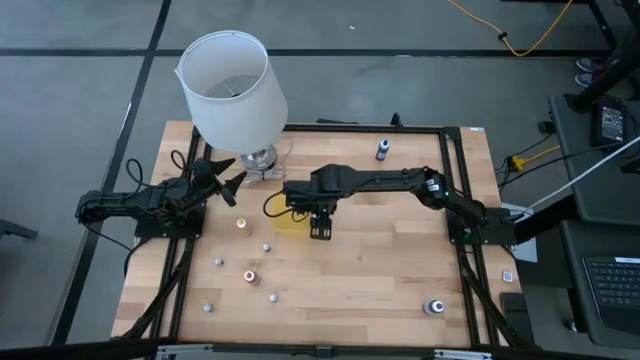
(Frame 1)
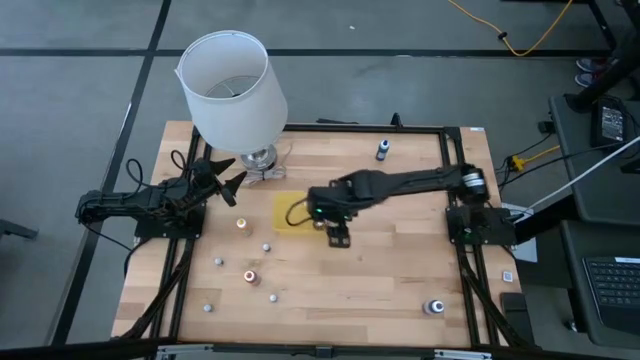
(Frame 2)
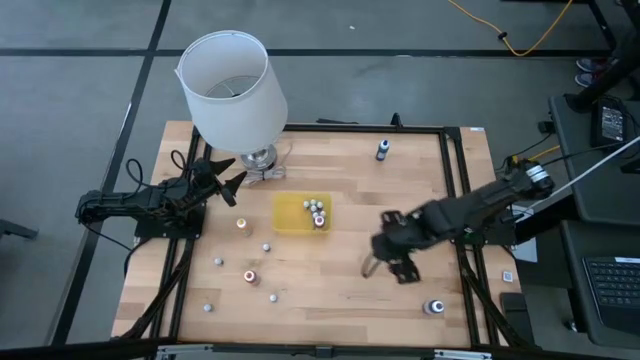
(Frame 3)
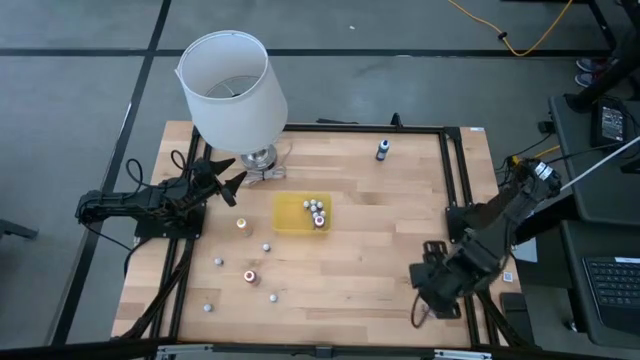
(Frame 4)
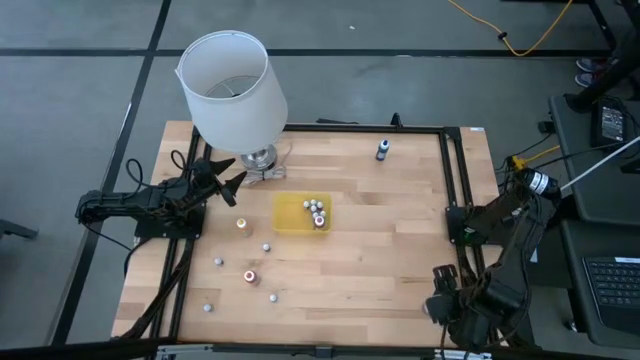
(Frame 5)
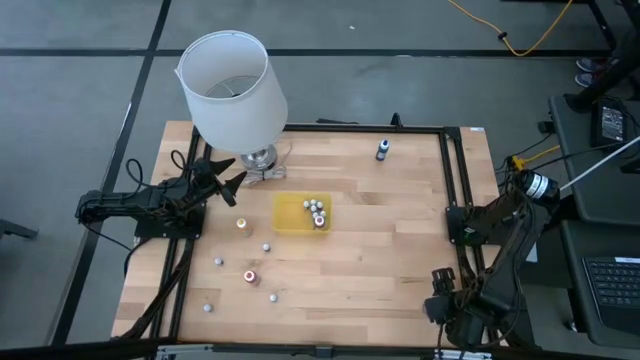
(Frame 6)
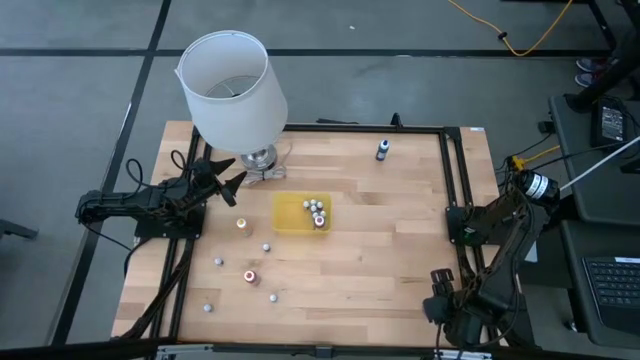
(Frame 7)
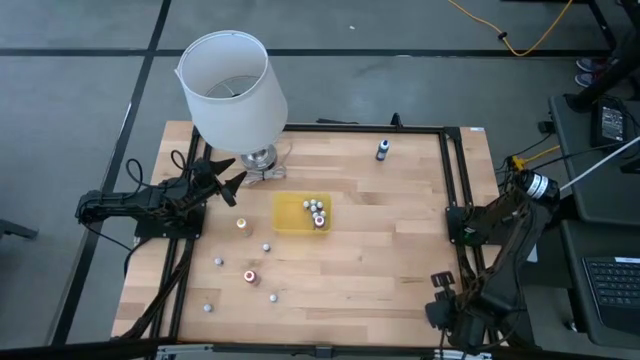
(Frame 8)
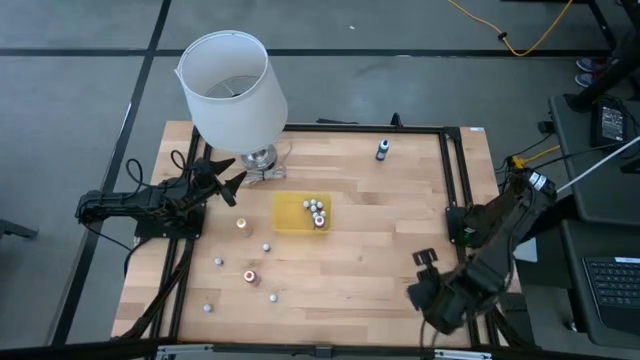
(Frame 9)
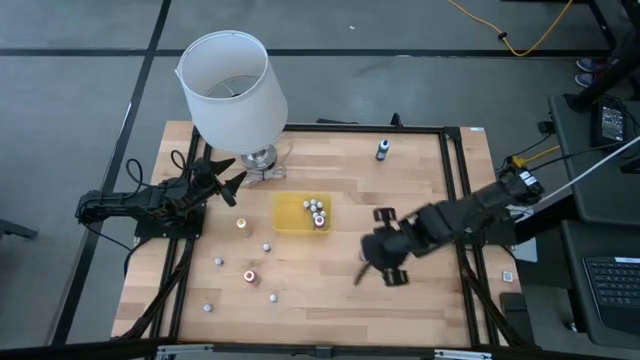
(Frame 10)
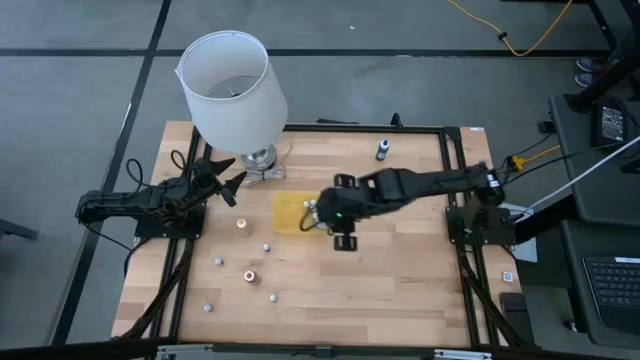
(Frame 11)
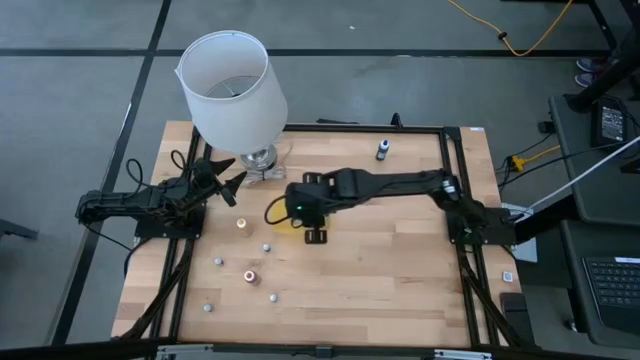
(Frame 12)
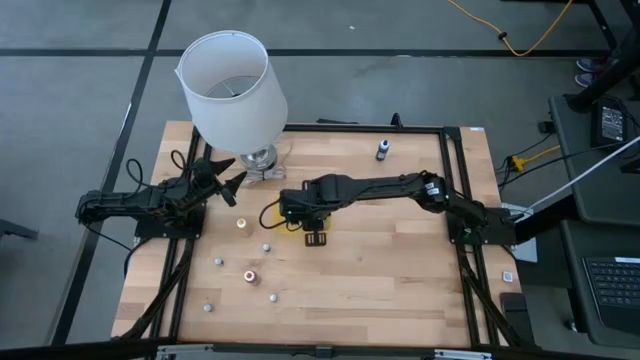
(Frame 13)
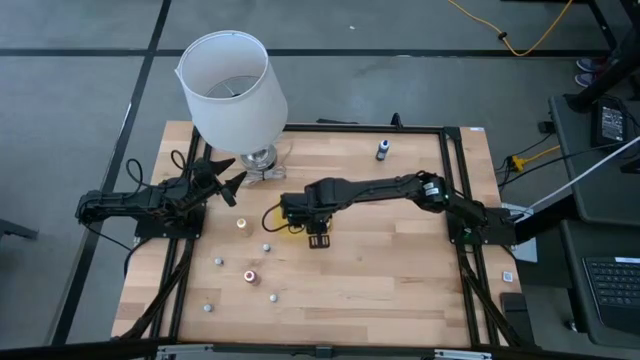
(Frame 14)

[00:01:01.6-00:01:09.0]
Task: Pick & Place food coloring
Put the purple ink bottle into the yellow bin

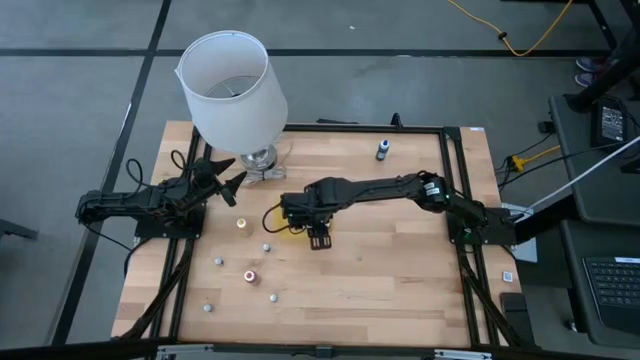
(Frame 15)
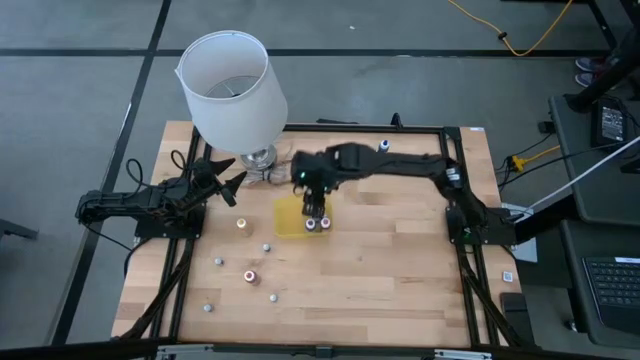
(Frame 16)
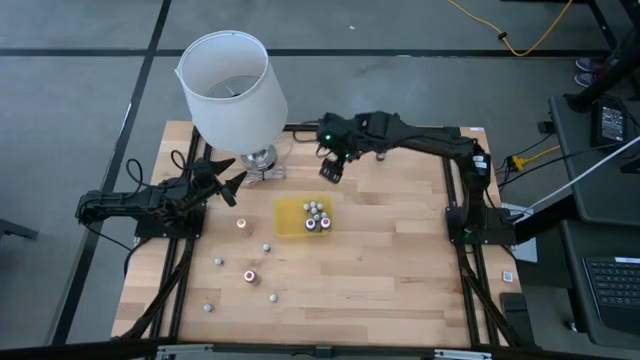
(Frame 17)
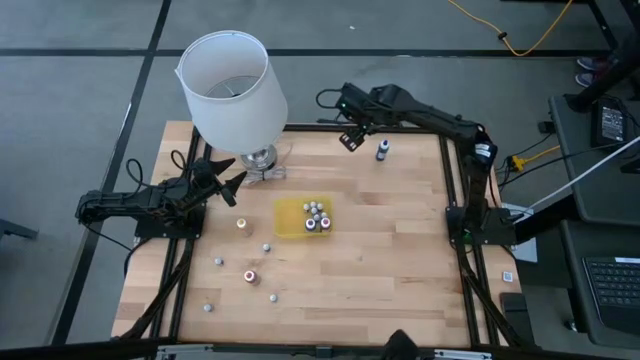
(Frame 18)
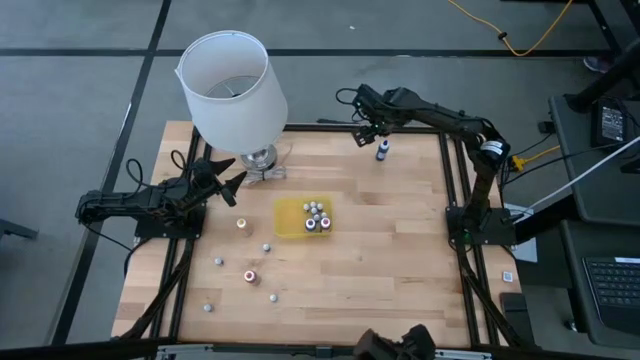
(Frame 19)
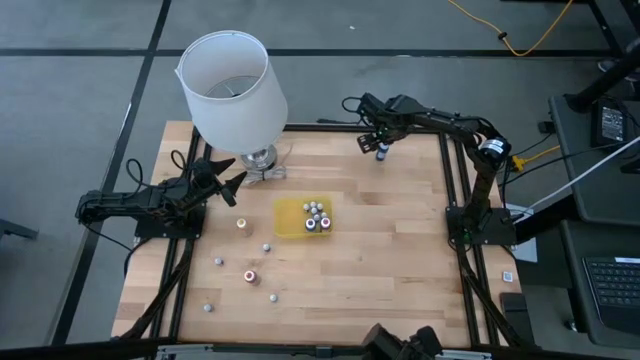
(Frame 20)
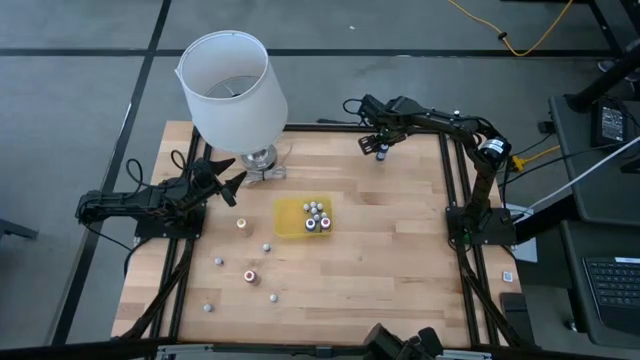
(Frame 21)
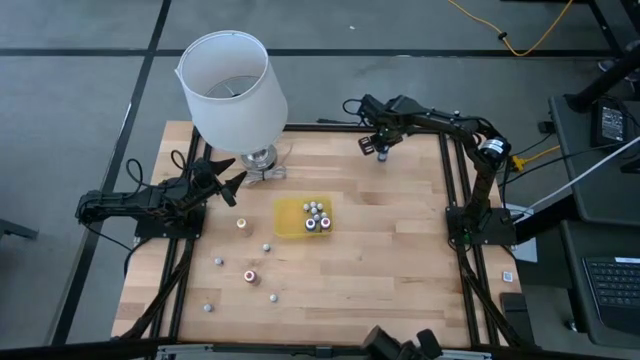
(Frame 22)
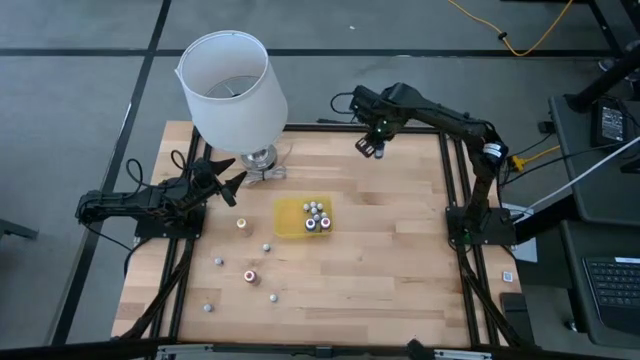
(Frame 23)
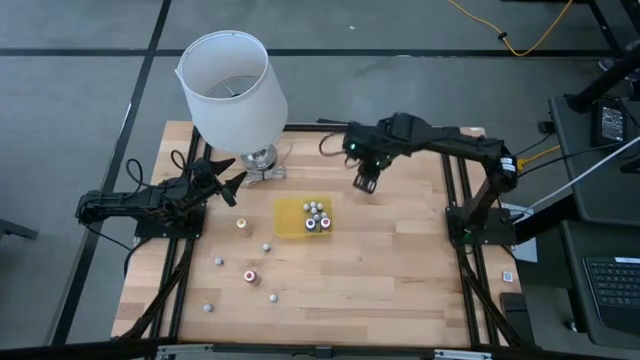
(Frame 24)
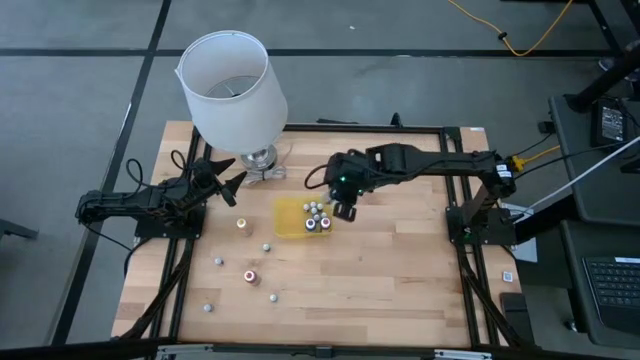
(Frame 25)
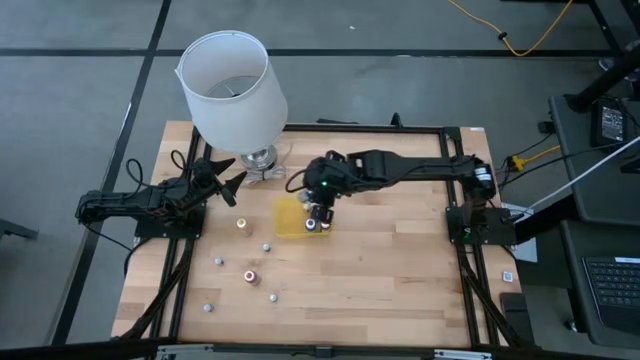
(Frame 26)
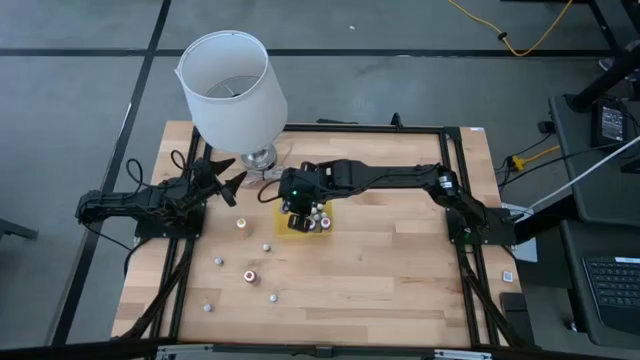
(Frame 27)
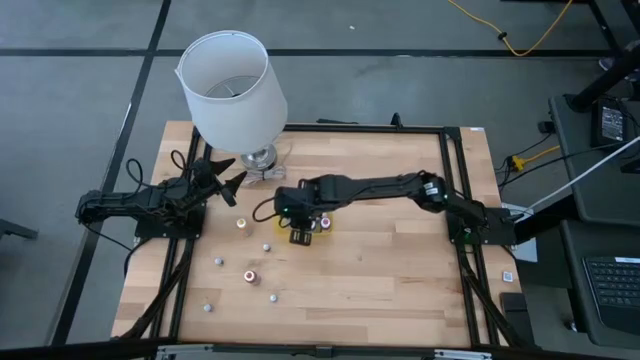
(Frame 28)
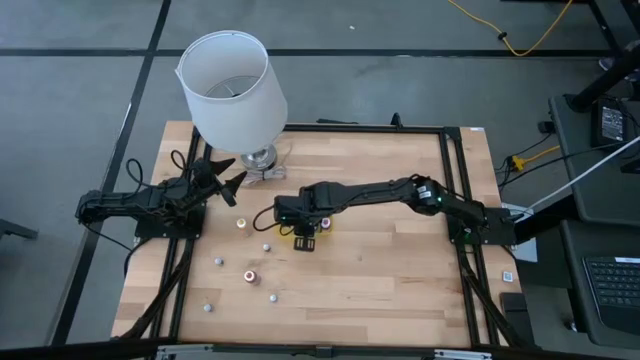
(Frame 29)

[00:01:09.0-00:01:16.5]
Put the blue food coloring bottle into the yellow bin

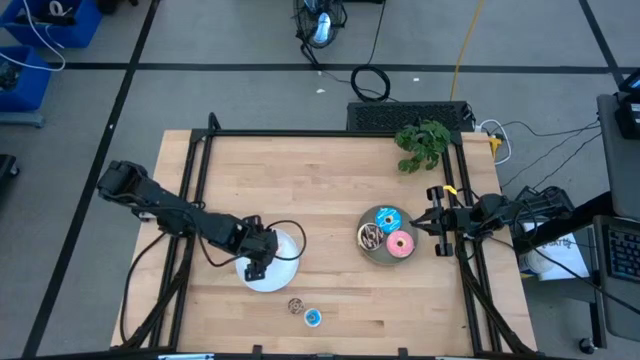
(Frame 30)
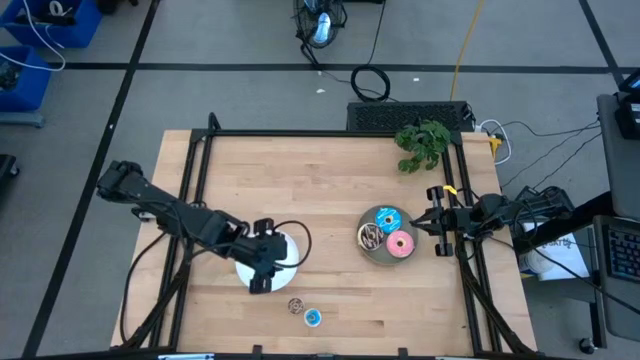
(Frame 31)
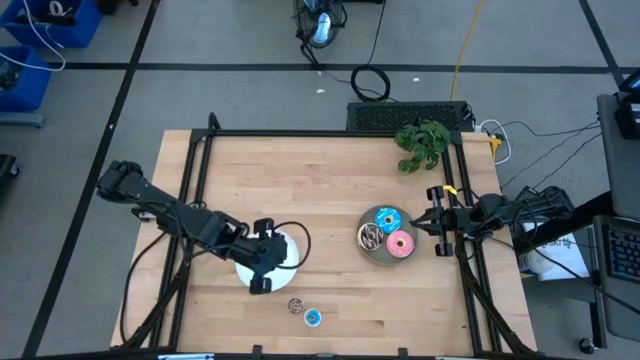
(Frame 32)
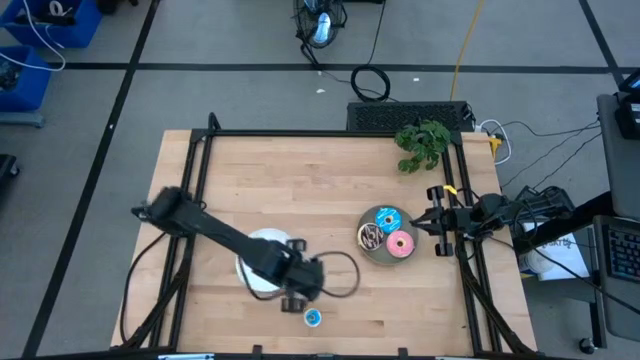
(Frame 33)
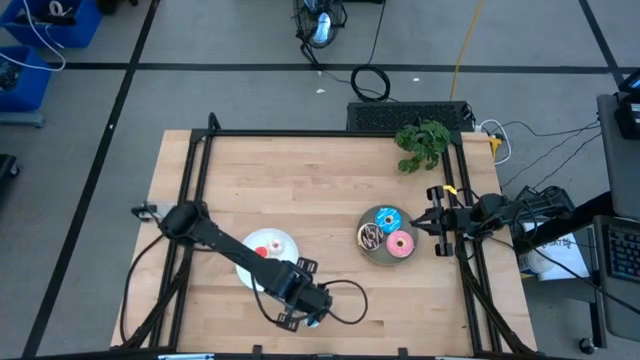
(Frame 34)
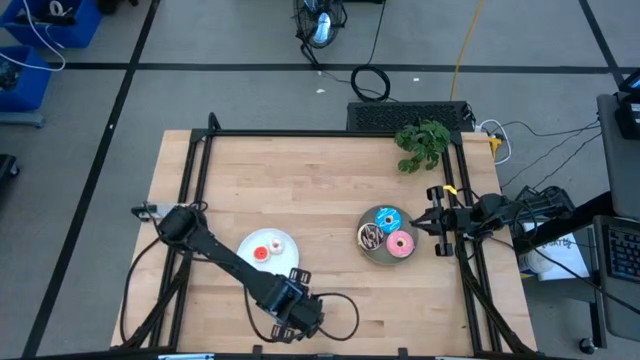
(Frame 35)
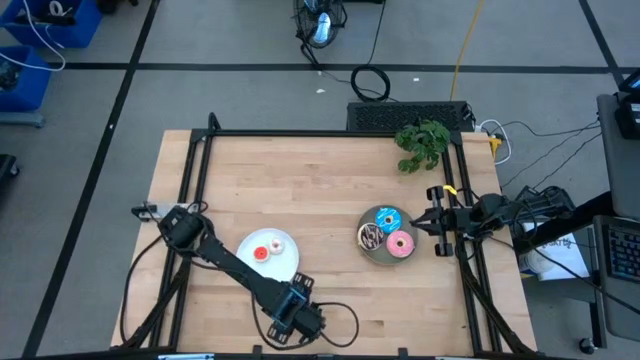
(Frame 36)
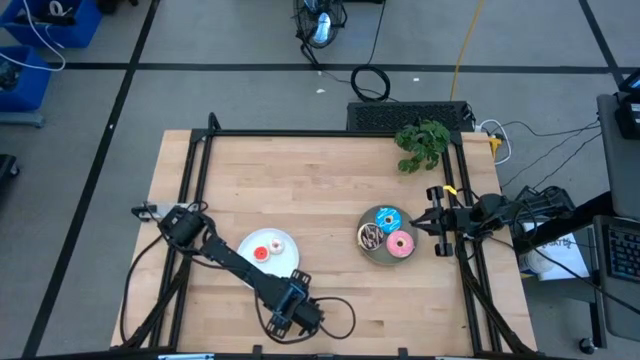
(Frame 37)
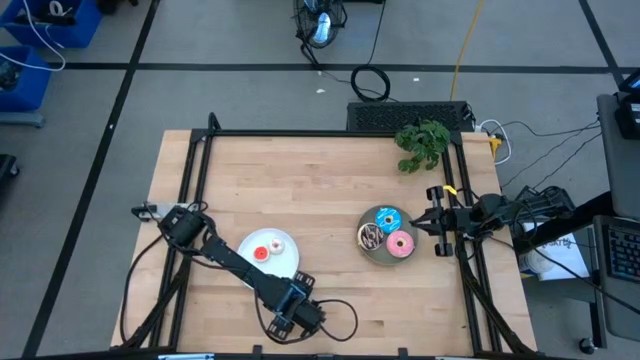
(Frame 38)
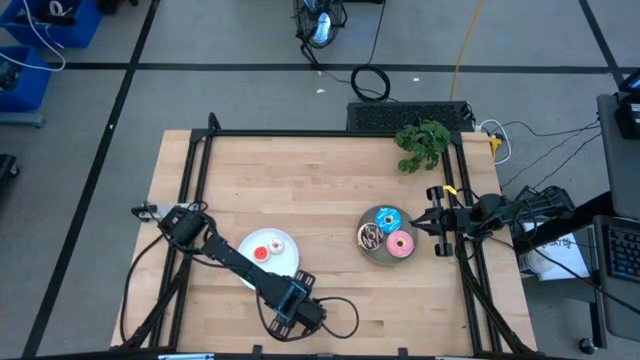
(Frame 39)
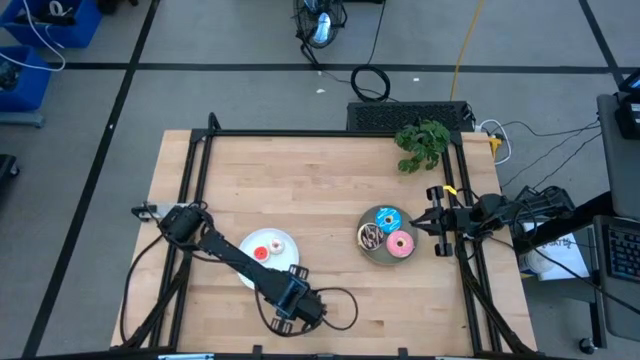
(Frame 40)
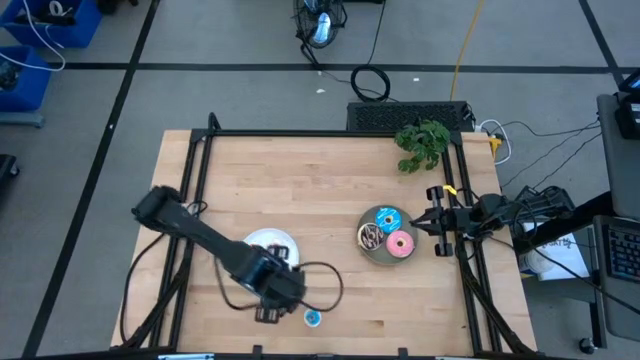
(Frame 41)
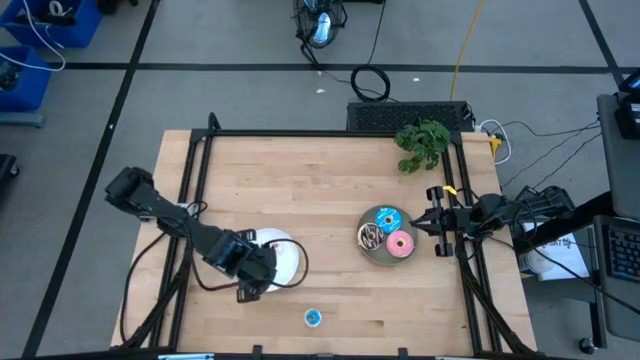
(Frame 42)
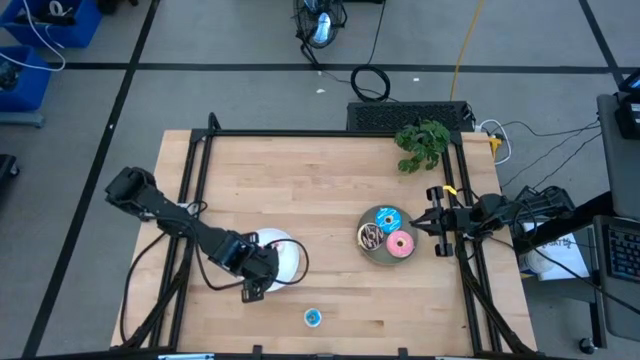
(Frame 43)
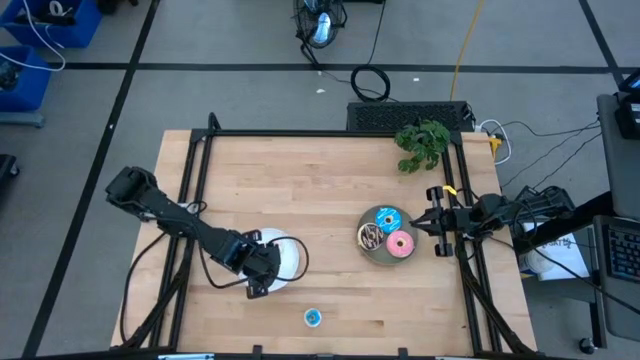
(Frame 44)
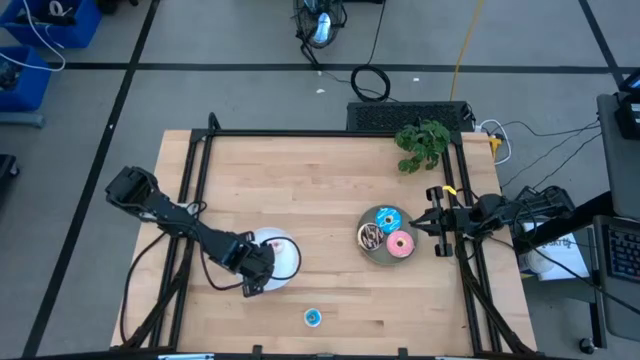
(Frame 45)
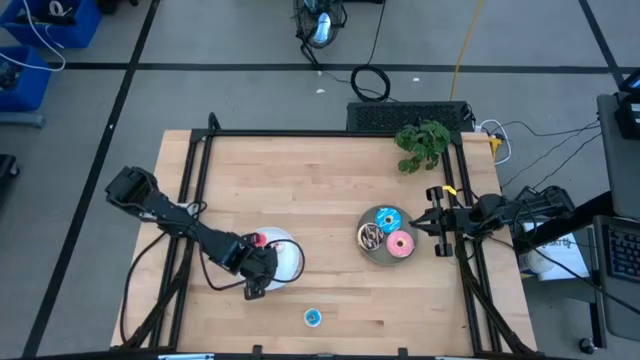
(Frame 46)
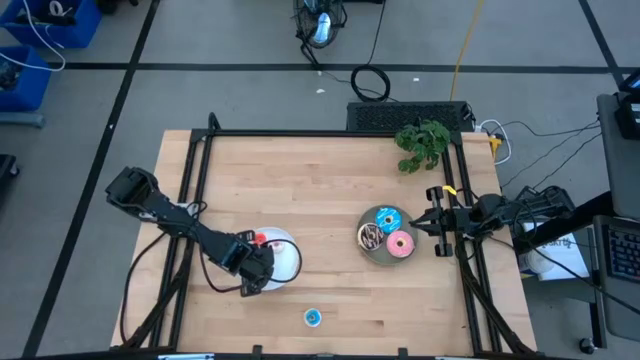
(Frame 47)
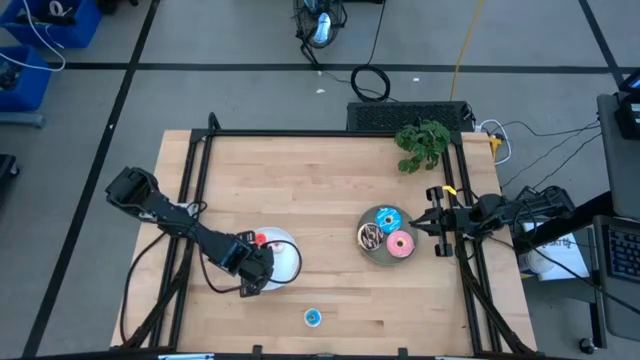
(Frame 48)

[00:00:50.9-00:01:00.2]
Task: Pick & Place donuts
Put the small brown donut on the white plate
